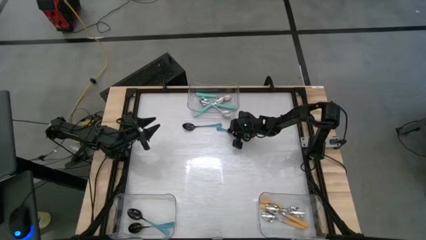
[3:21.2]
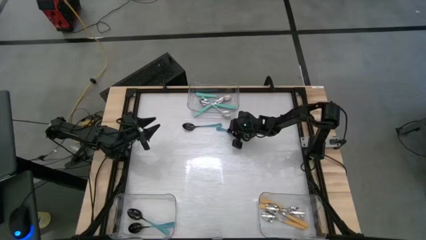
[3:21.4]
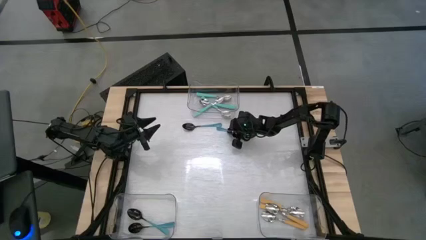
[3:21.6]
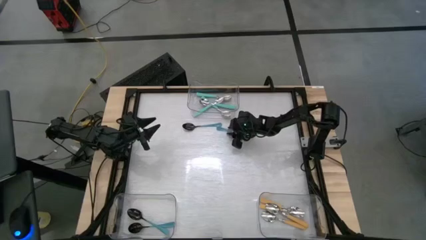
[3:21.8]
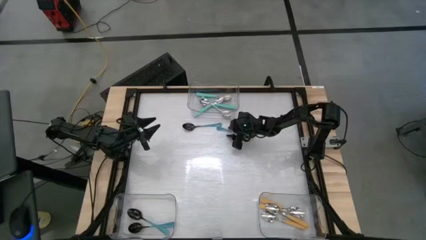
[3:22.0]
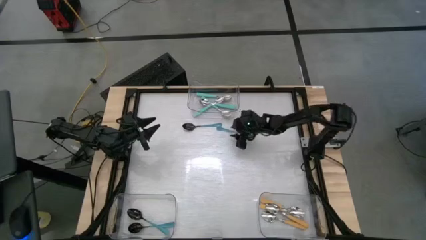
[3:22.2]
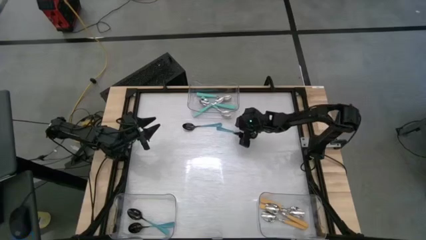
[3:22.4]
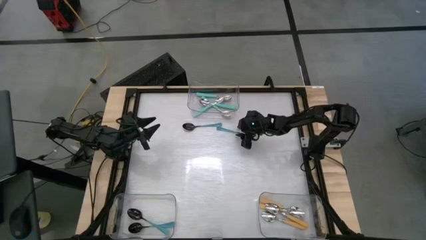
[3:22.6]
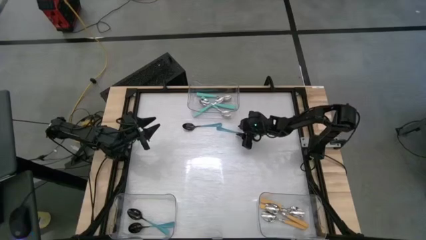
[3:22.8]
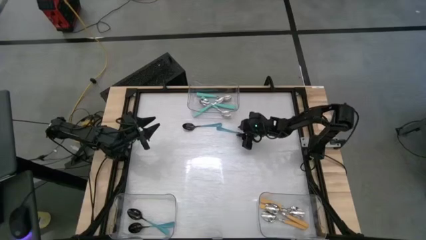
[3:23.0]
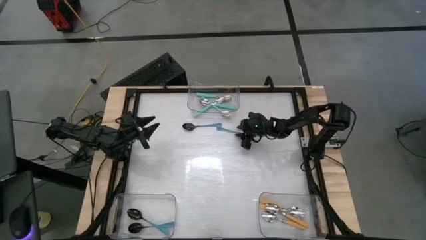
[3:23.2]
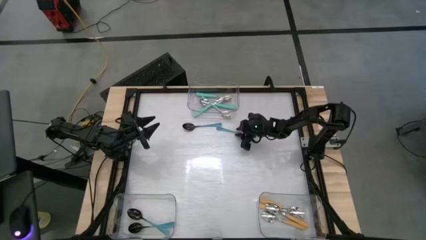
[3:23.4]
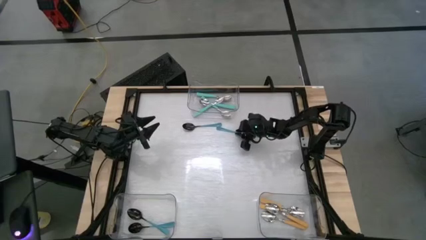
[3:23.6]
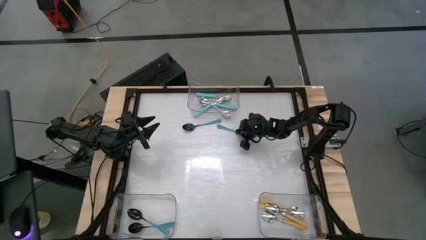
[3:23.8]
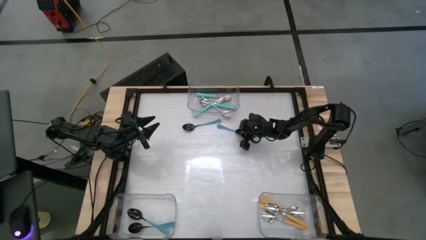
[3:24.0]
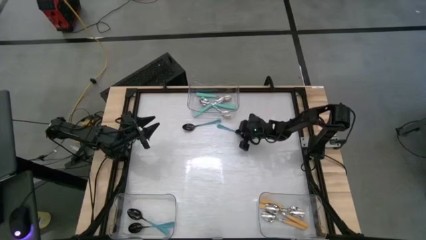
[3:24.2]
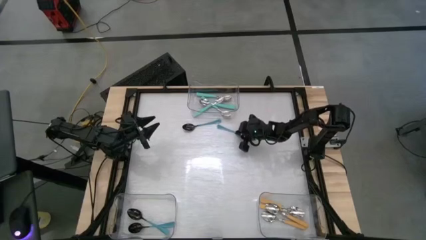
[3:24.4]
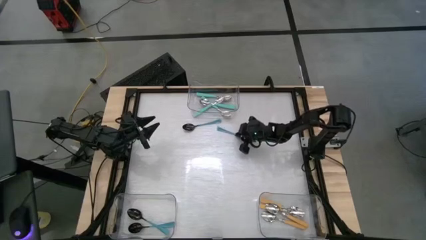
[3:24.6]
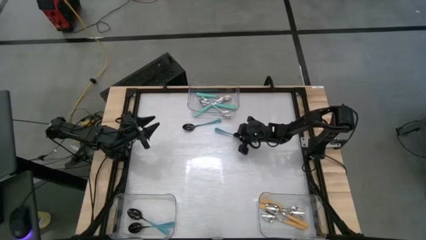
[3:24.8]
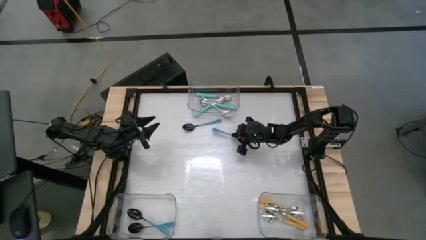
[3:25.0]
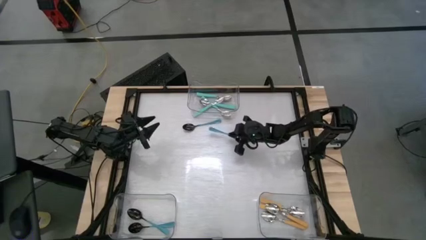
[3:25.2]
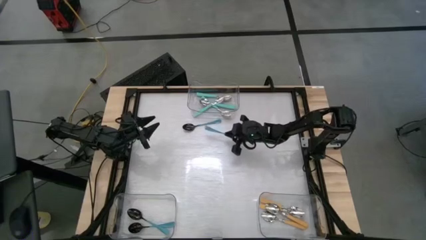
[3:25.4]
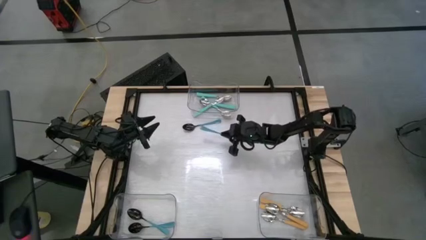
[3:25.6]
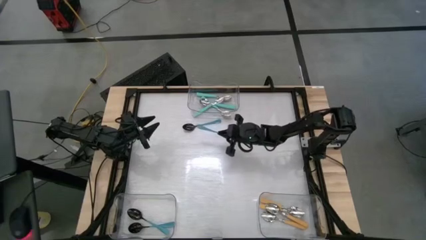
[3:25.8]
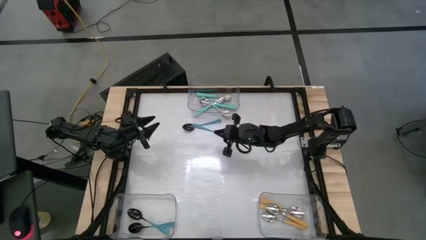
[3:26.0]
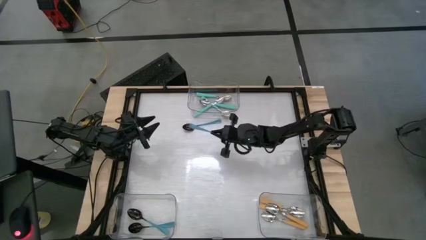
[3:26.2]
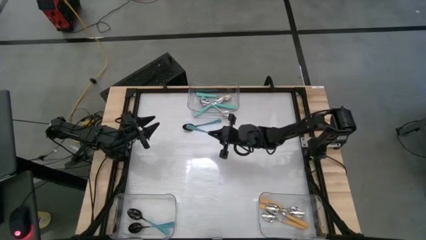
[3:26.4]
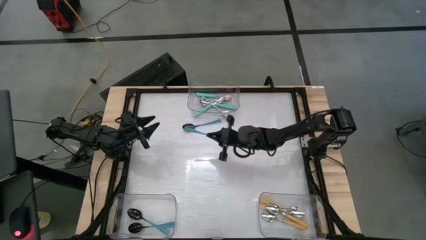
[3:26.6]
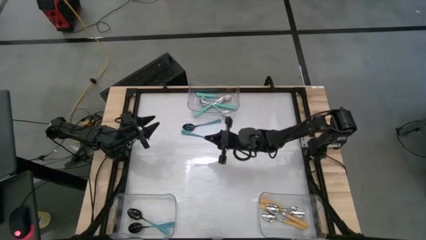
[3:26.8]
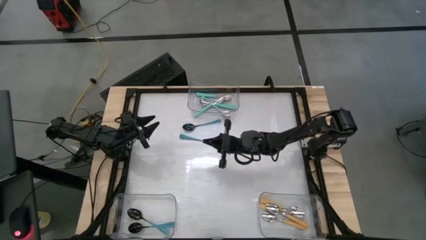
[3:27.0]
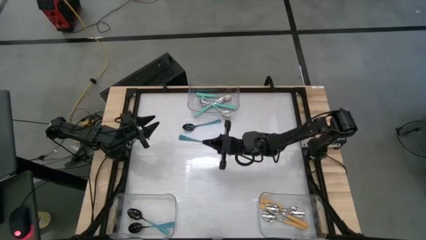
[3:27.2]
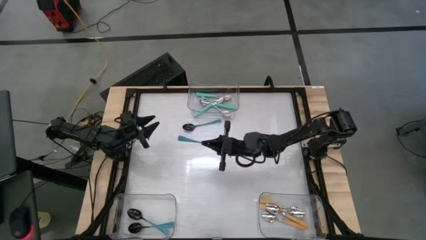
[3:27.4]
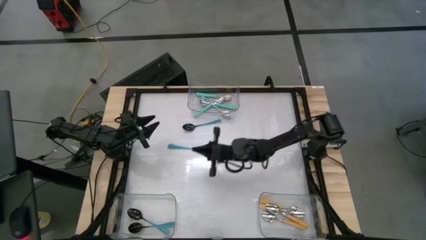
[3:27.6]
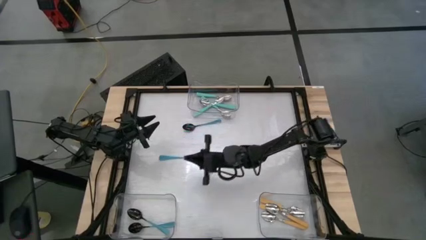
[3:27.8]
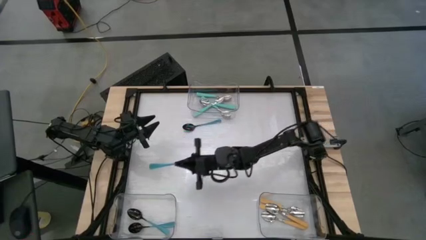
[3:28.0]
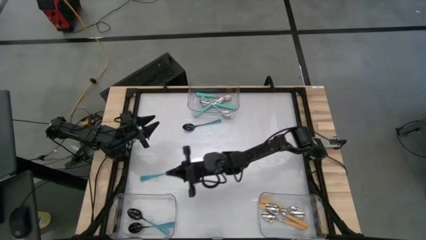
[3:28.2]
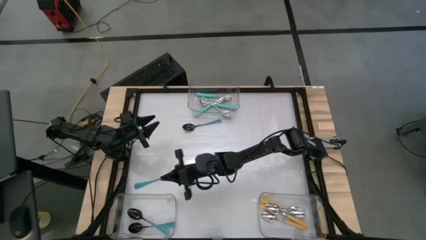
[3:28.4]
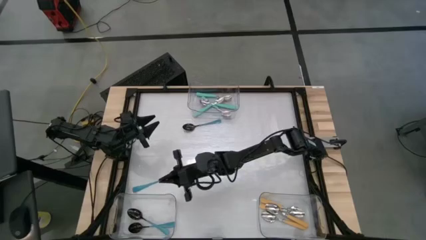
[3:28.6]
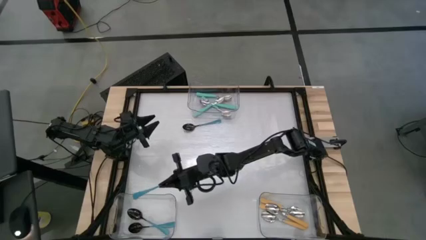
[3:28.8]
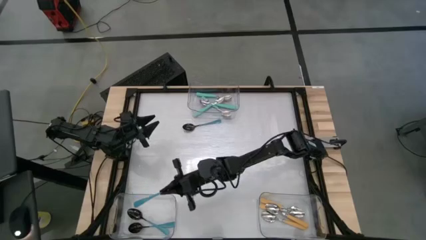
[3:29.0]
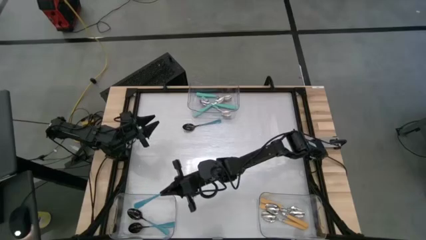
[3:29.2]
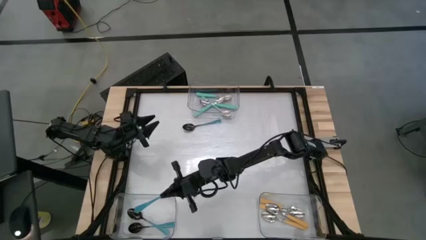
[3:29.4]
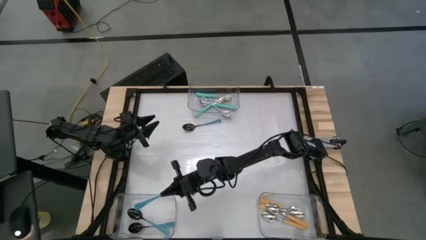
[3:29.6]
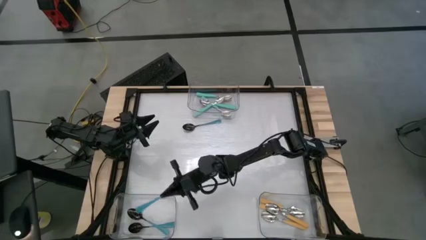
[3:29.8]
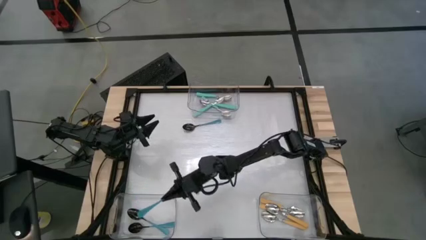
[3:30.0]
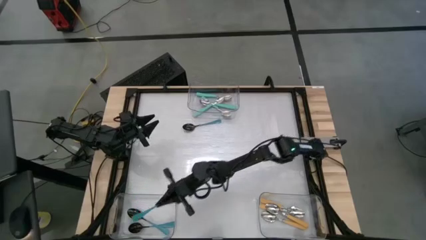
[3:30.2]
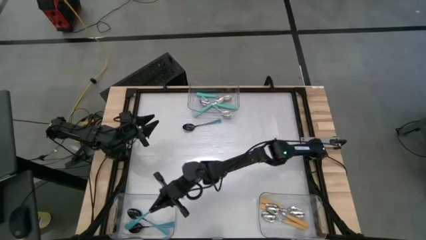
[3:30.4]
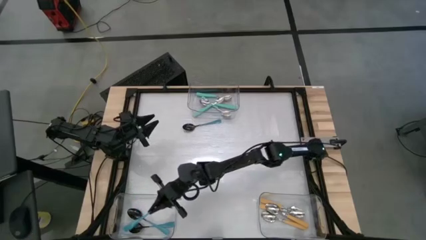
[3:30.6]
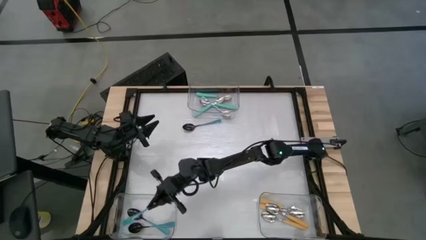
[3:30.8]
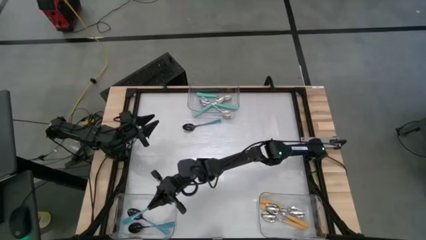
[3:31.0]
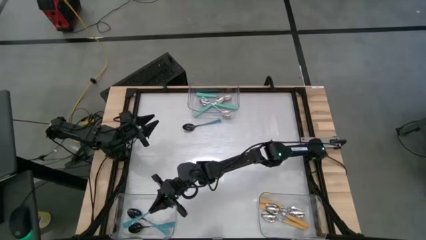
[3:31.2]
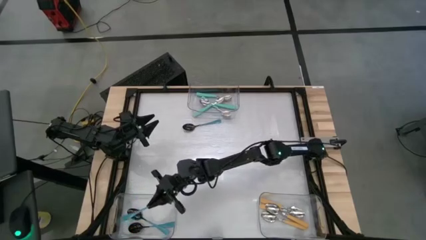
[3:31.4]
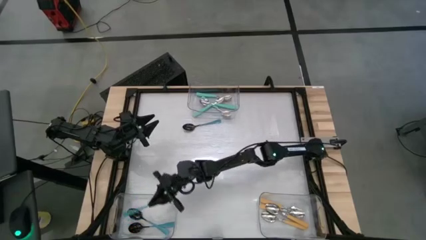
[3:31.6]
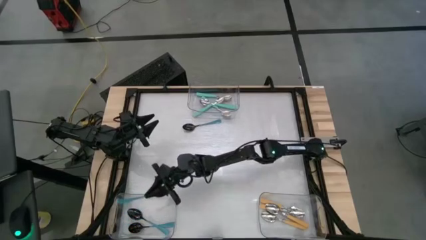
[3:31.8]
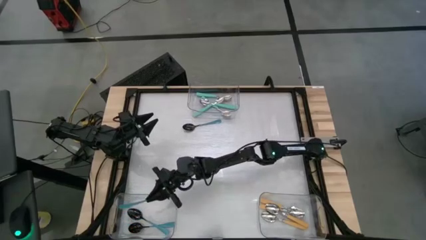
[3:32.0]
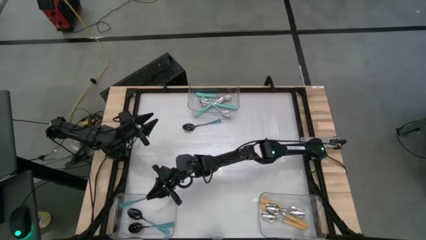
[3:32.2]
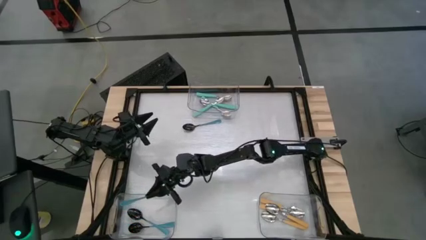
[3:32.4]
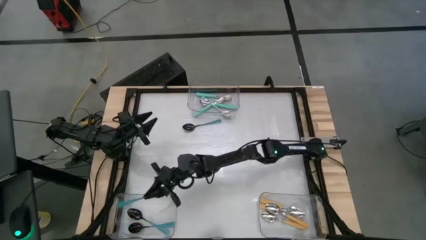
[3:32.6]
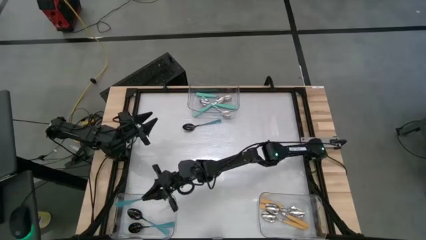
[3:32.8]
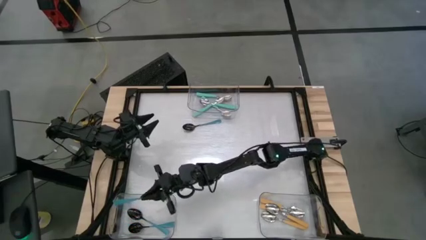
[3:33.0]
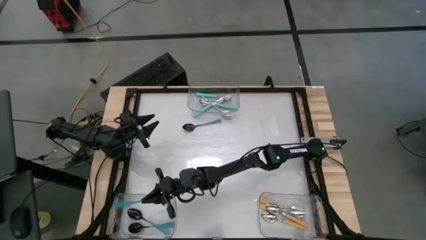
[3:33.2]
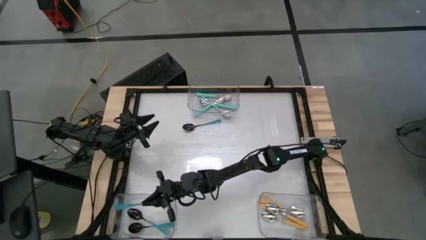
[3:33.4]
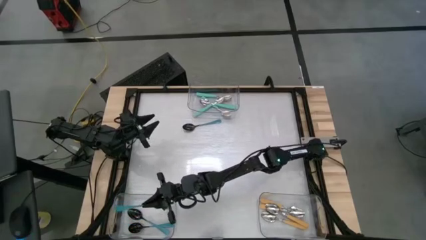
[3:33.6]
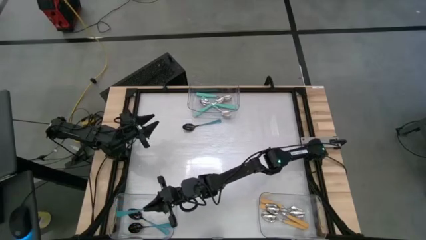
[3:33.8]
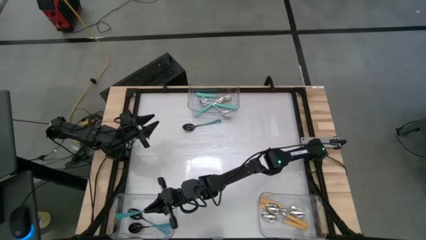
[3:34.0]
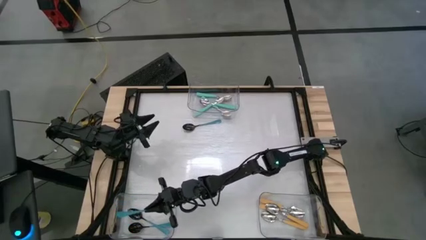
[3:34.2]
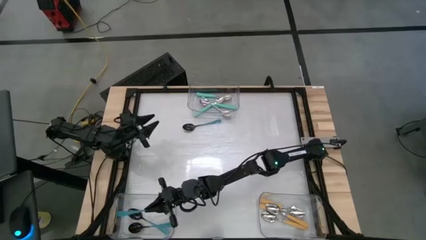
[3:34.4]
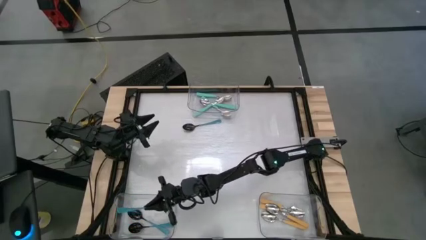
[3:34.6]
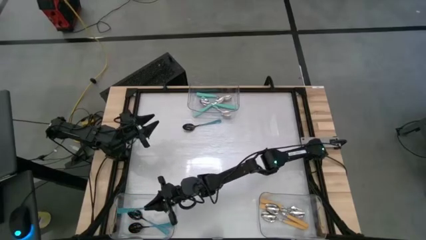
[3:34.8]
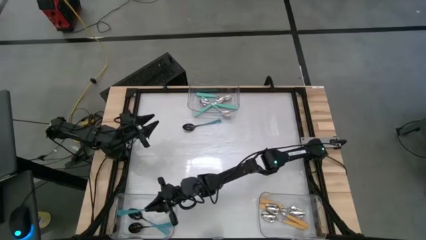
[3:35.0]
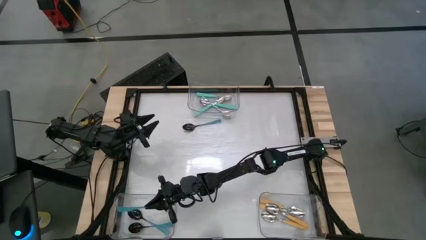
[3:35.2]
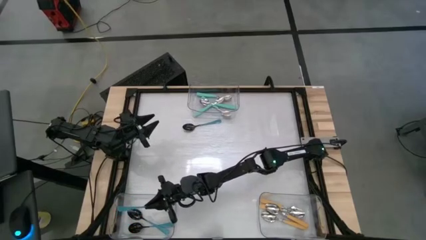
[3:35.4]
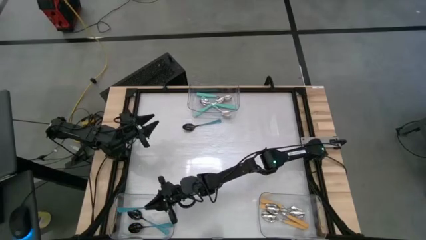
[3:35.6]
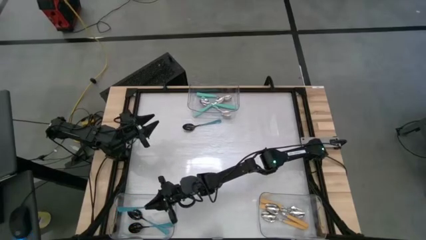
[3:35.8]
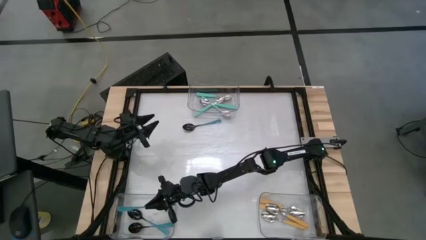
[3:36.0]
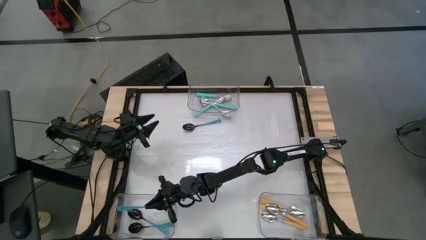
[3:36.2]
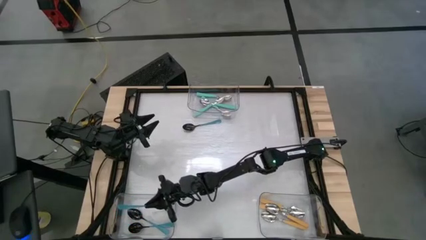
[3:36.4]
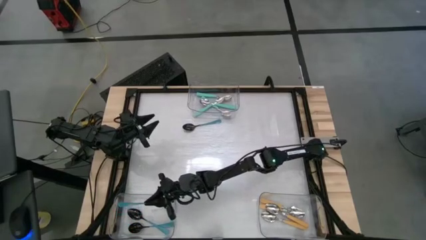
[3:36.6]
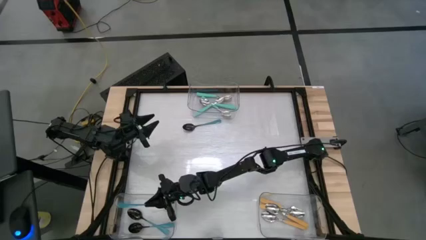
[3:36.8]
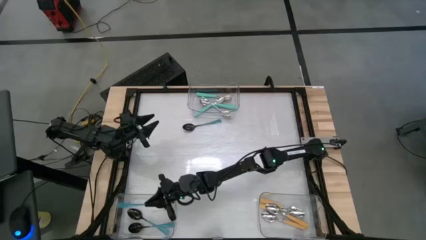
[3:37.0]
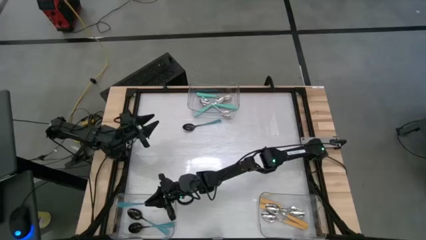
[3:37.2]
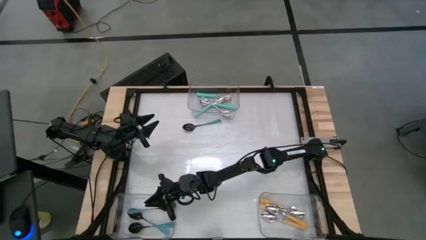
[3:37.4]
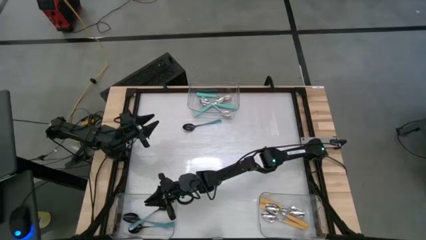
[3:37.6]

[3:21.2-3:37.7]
Task: Sort silverware by color (type)
Put the right black spoon into the bottom left transparent bin
